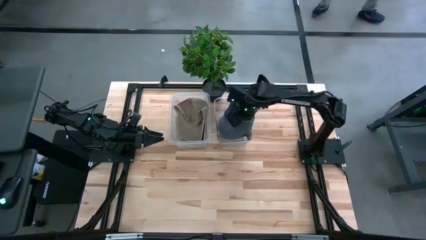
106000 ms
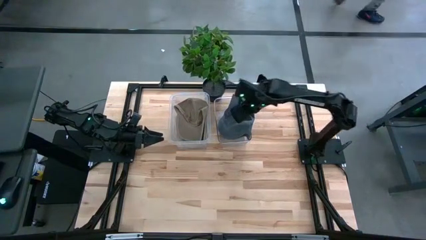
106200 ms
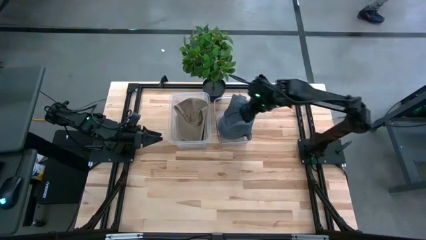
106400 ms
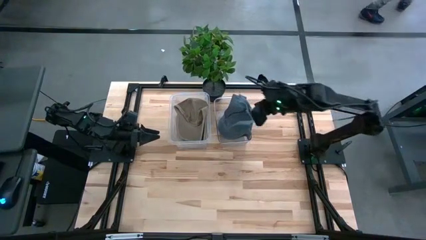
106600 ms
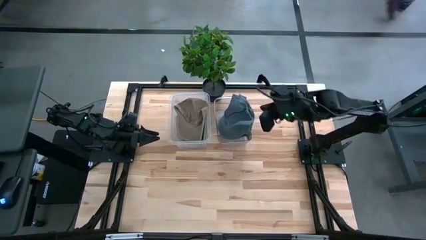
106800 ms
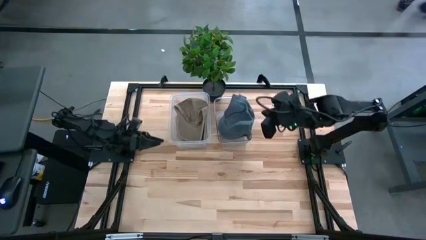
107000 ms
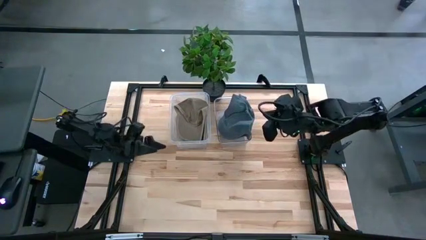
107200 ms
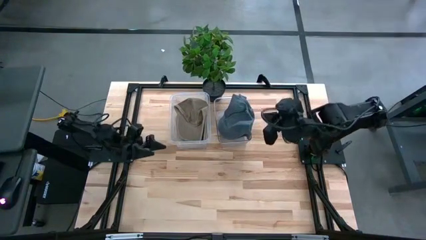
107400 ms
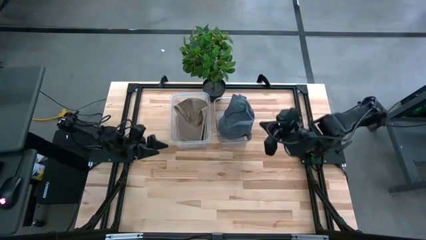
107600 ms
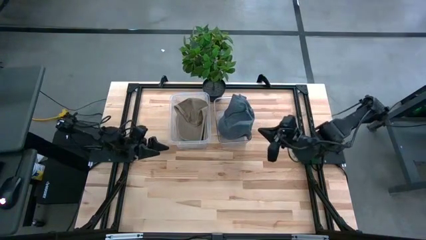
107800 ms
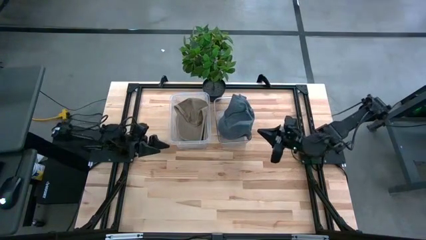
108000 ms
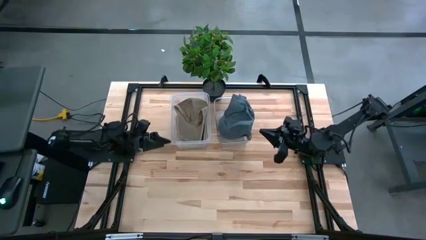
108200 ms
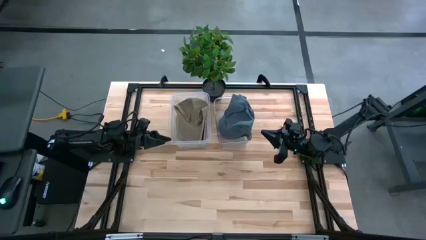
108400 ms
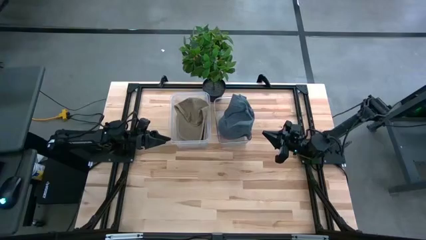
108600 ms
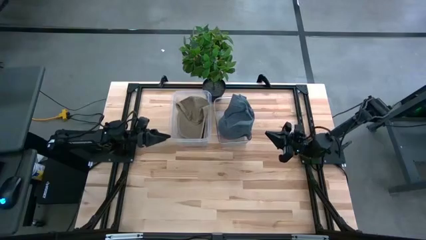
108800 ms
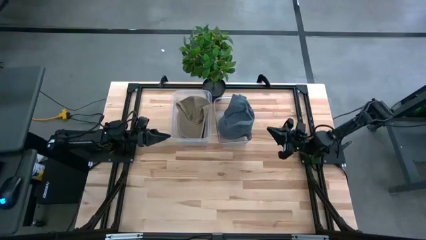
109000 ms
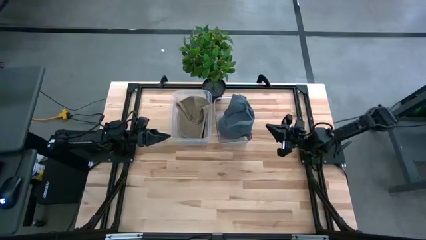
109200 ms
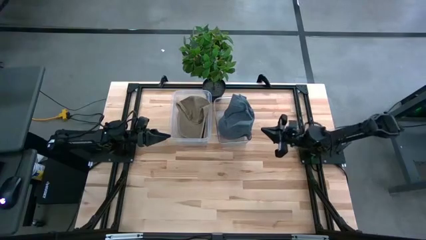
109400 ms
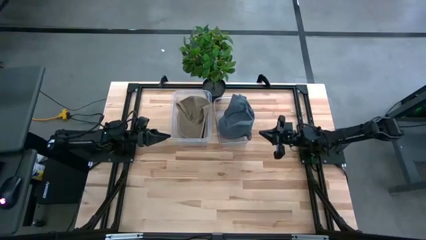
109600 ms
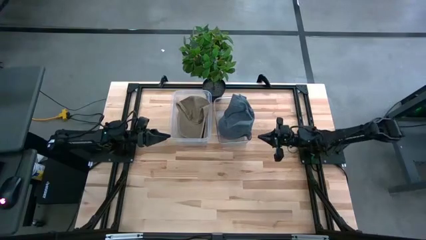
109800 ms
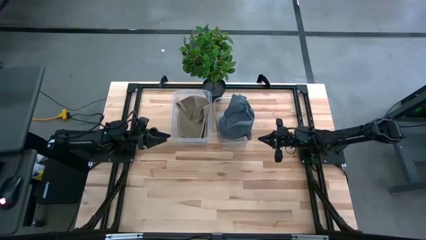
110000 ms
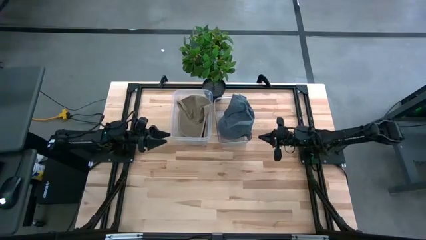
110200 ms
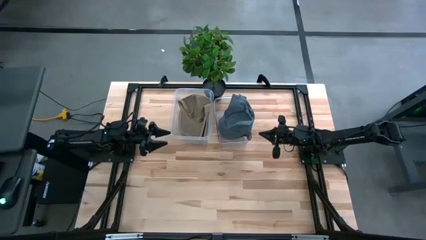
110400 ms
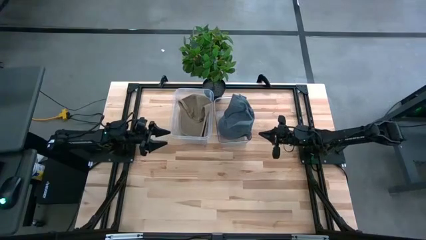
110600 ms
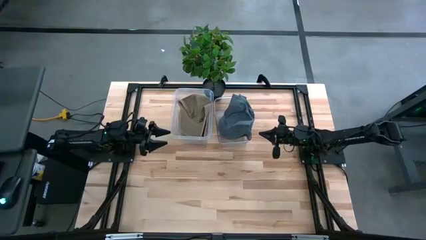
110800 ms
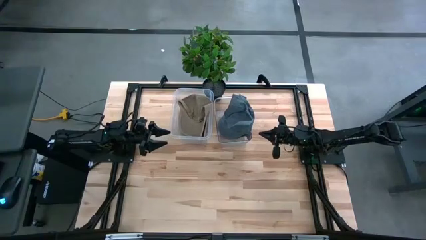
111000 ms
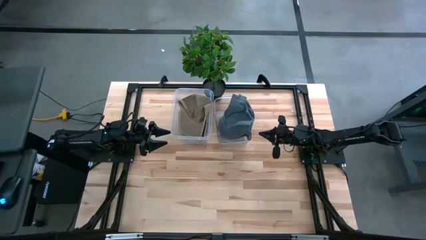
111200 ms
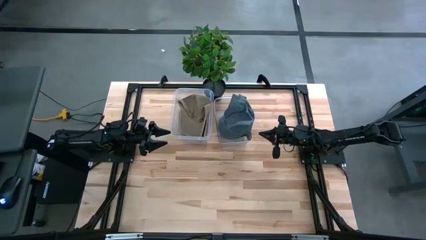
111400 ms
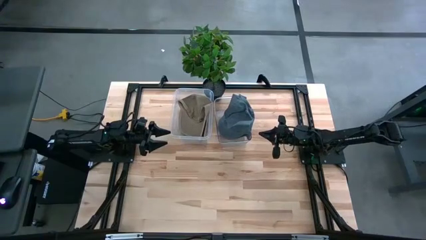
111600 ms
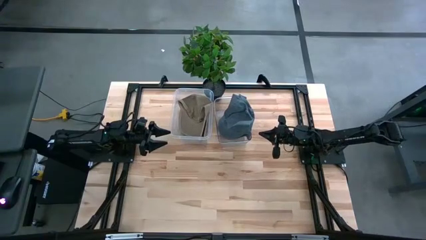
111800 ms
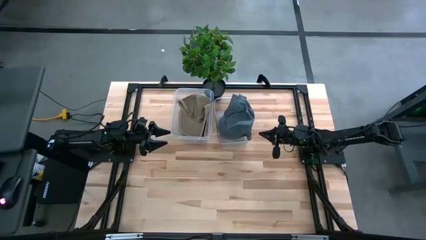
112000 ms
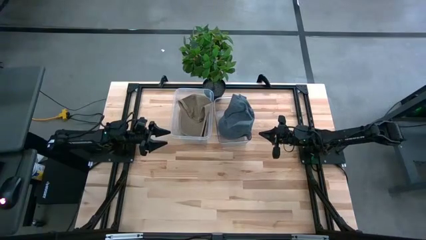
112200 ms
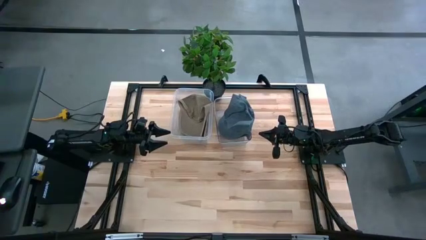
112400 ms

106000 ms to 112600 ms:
Task: Pick & Place hat
Return to Home Position

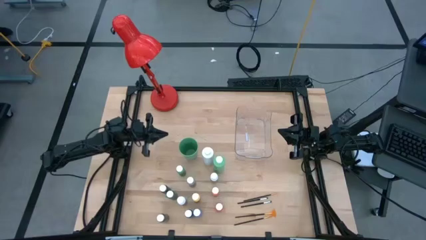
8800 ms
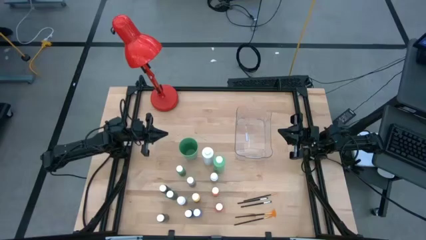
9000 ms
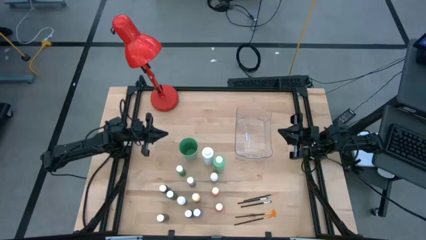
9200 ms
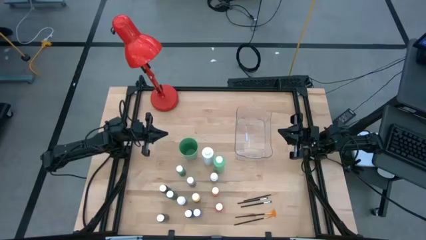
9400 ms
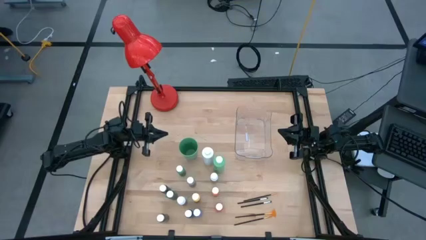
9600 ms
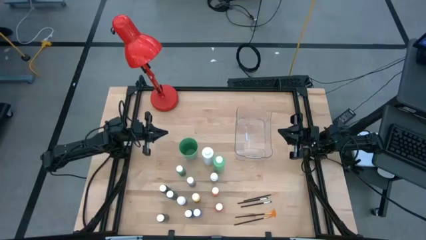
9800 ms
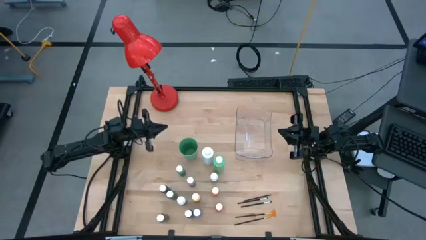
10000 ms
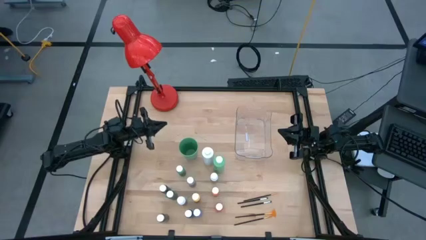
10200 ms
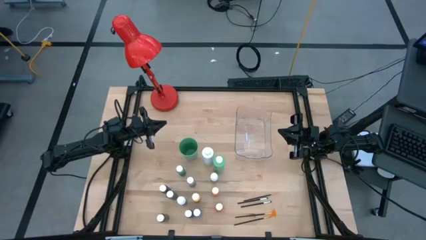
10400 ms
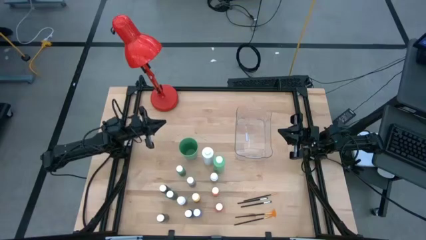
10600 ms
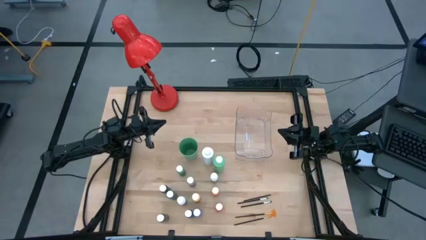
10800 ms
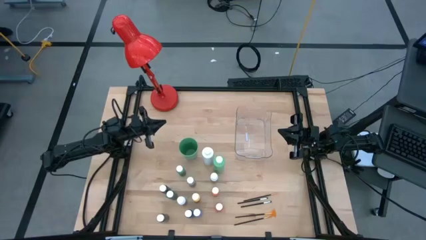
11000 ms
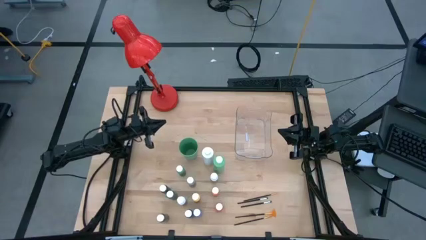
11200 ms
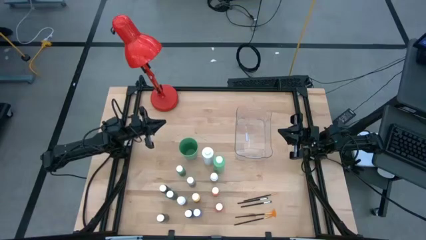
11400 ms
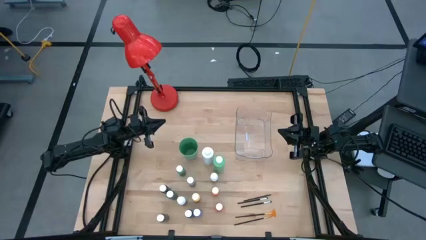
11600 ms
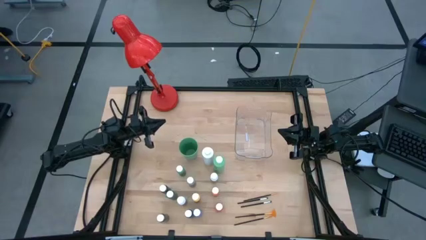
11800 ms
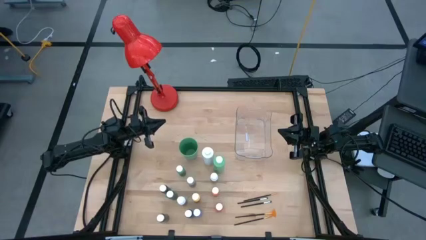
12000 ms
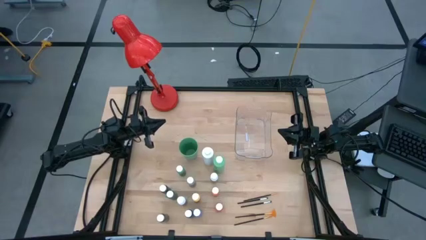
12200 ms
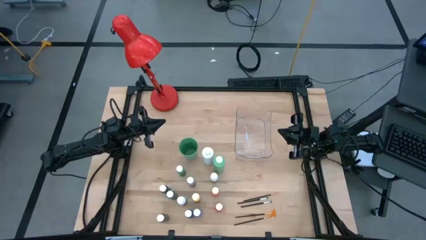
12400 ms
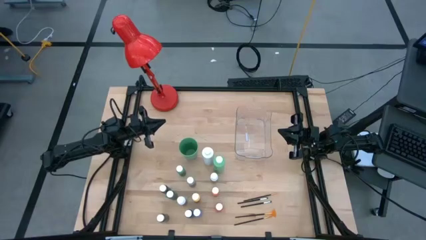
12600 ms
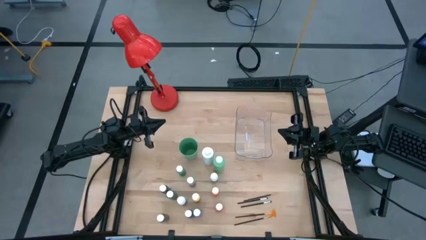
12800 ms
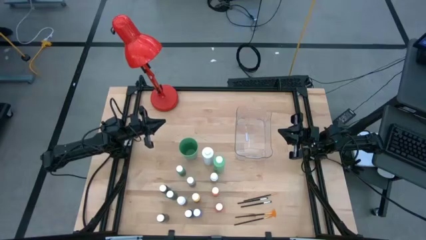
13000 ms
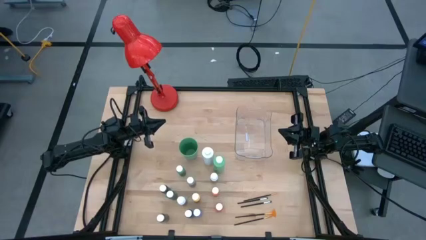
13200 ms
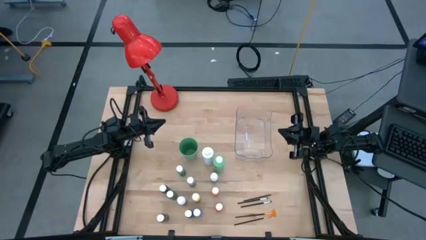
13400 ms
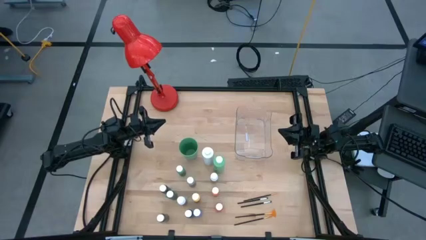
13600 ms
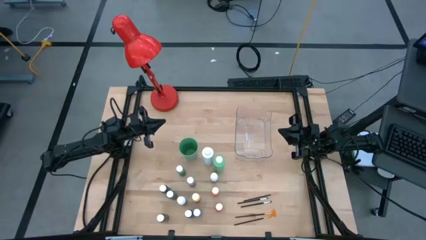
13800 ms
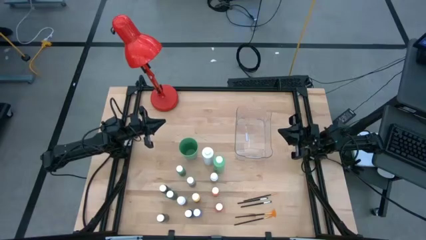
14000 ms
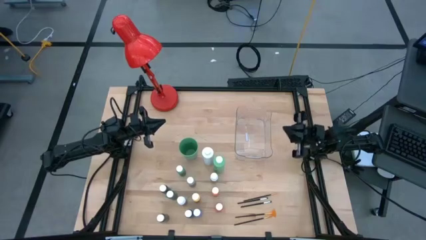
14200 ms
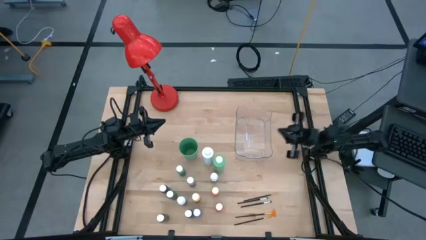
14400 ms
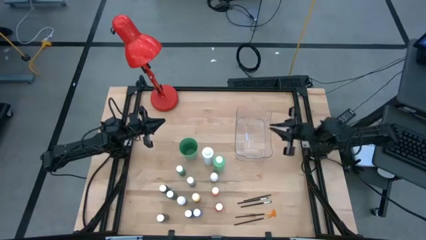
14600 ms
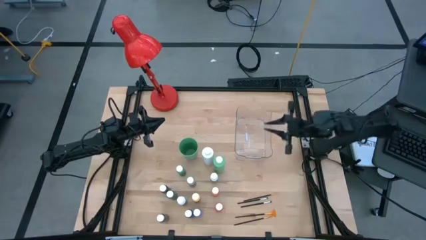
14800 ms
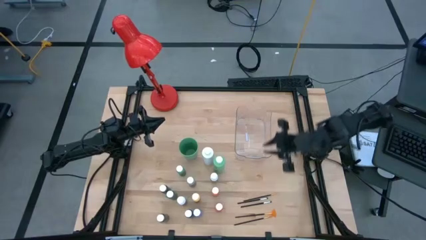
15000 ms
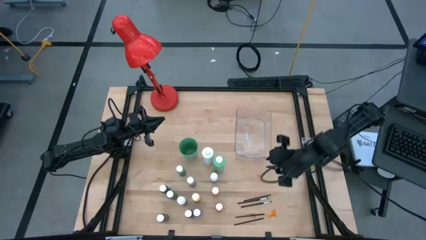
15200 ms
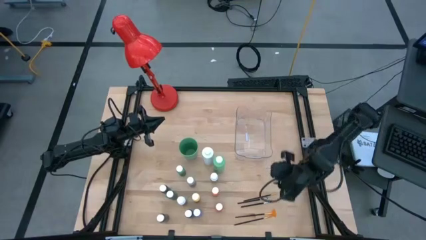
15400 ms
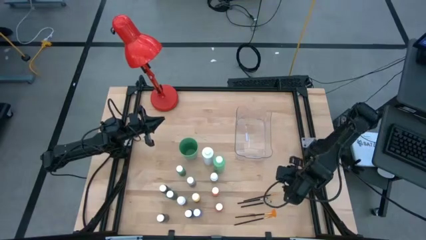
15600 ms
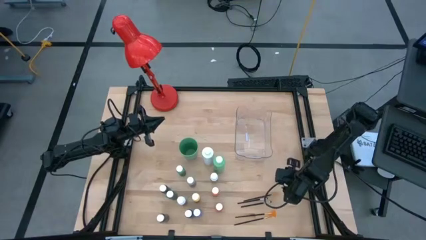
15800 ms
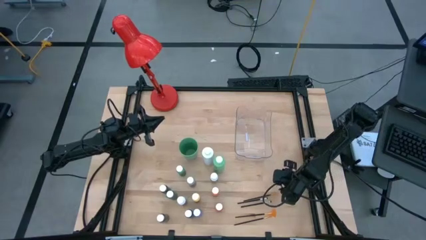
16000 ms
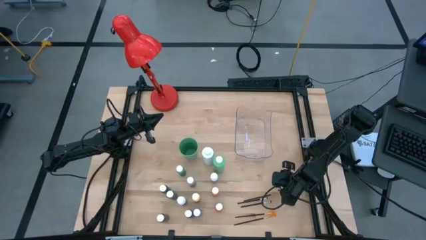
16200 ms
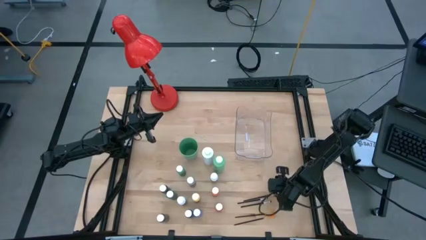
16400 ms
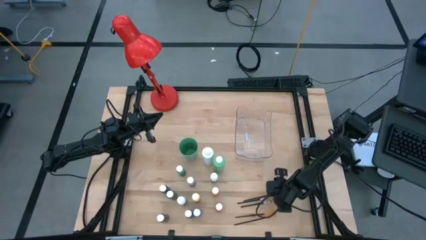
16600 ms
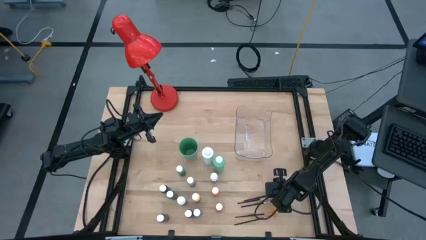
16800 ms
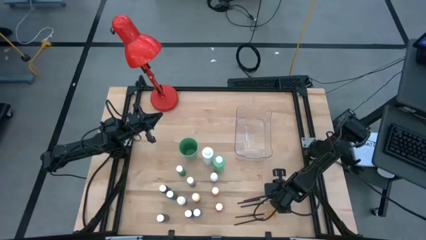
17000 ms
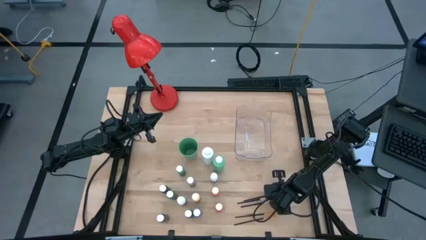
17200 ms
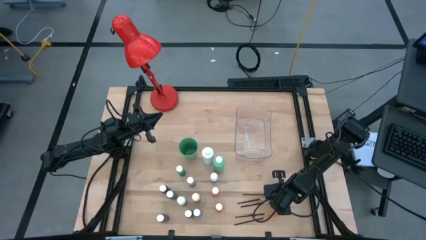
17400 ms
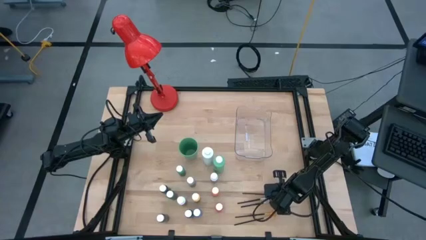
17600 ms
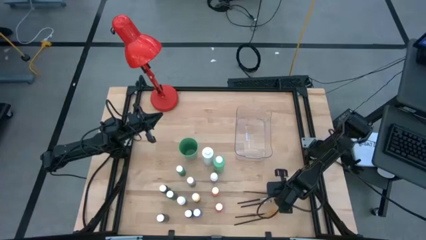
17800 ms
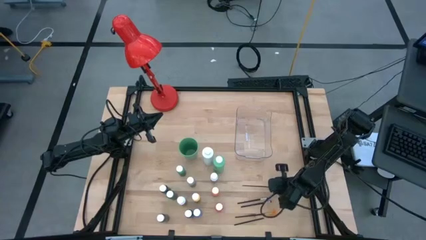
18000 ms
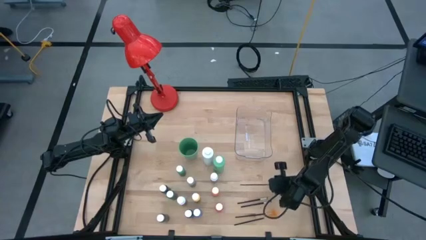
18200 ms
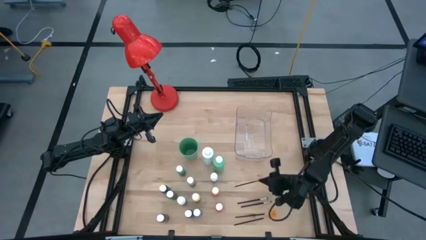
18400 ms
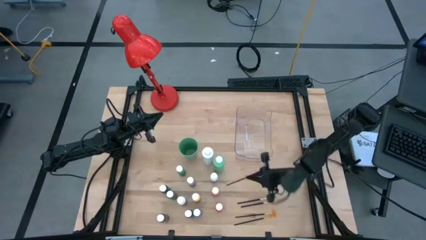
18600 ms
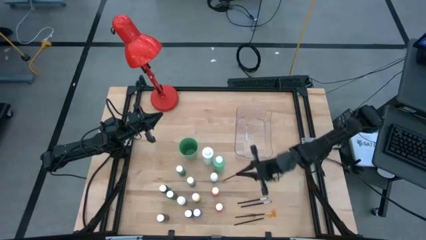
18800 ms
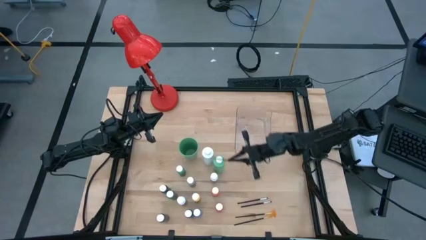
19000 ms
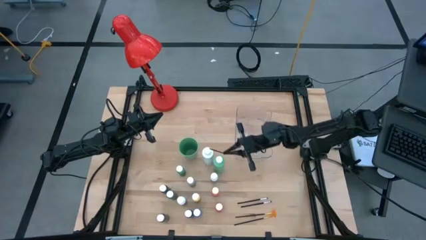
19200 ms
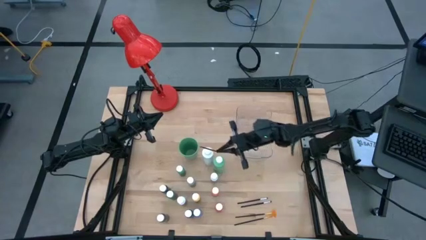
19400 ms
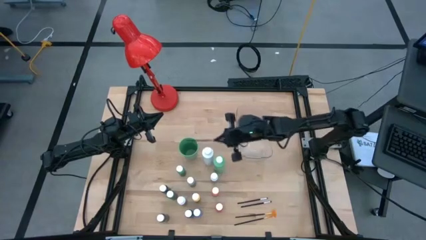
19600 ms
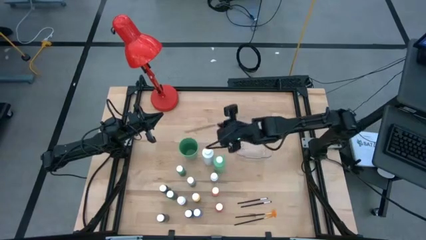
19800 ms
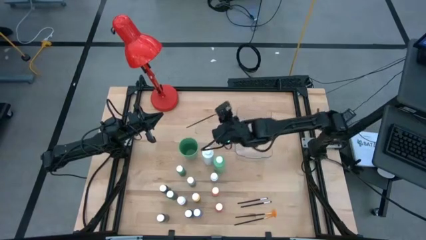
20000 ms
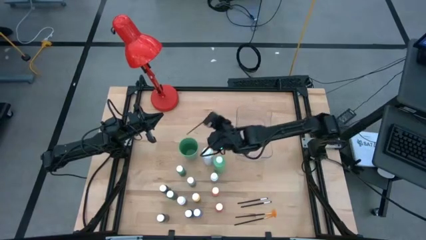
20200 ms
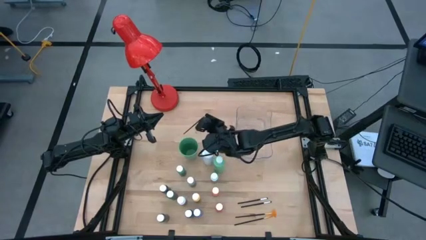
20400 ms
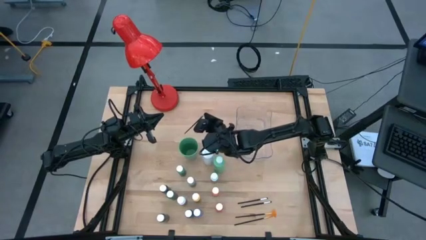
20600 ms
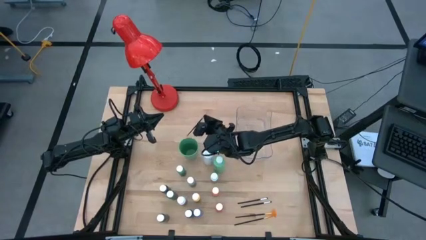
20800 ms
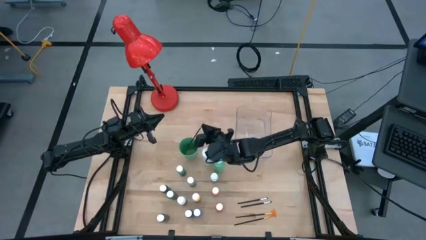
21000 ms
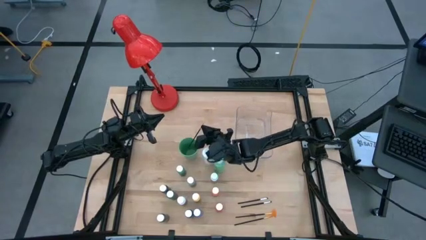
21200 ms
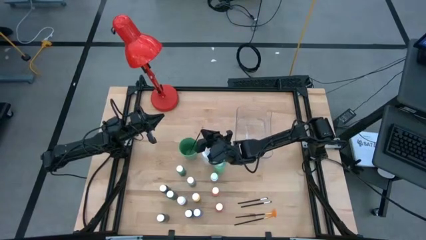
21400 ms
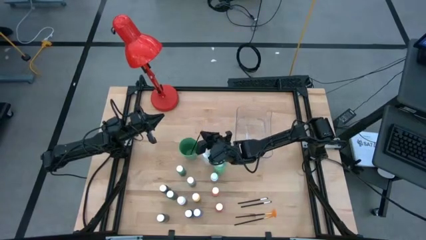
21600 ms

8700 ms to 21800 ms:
Task: Pick & Place Paint Supplies
Put the top gold paintbrush into the green cup
